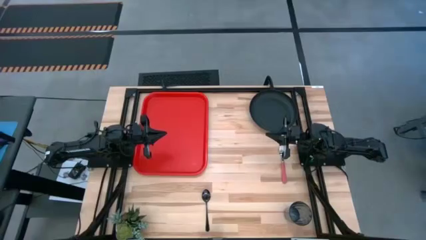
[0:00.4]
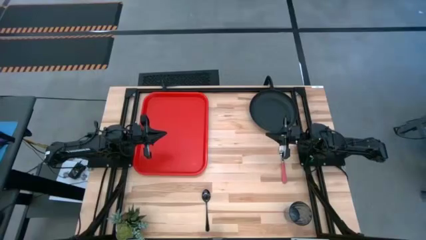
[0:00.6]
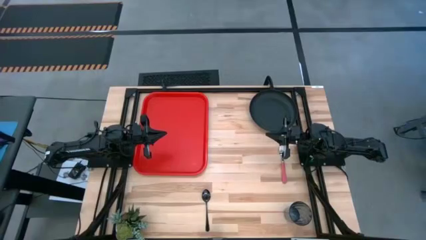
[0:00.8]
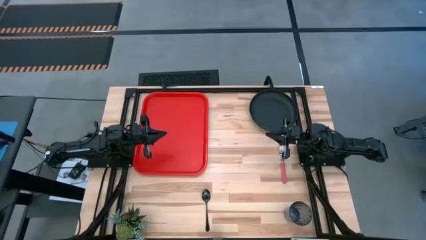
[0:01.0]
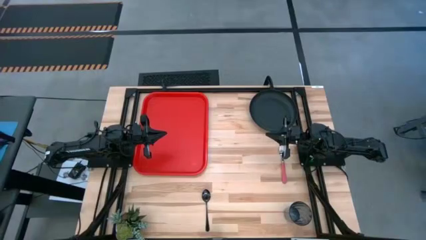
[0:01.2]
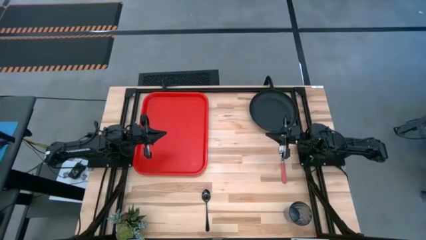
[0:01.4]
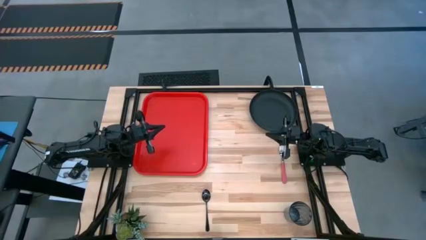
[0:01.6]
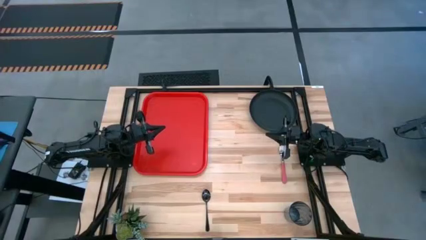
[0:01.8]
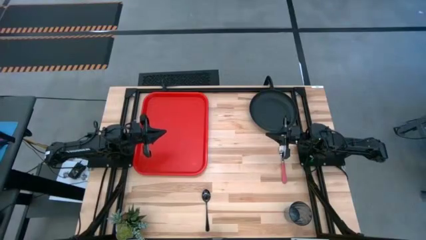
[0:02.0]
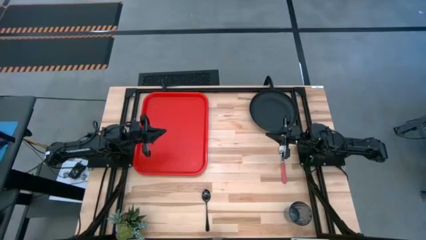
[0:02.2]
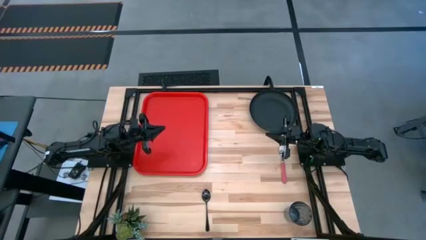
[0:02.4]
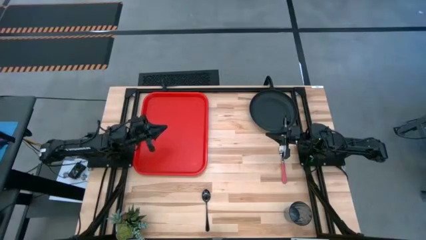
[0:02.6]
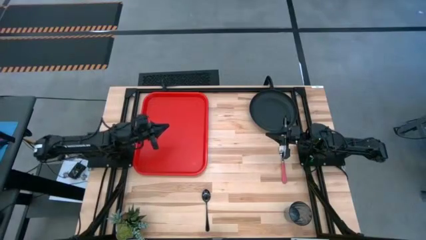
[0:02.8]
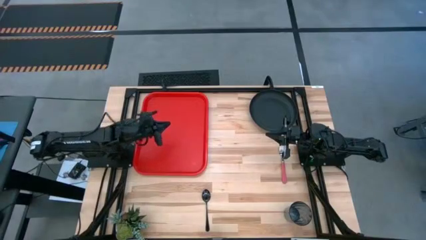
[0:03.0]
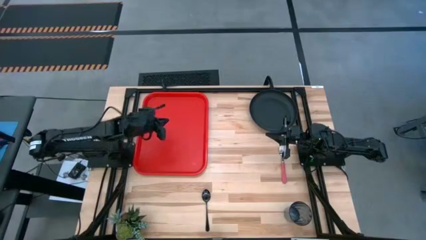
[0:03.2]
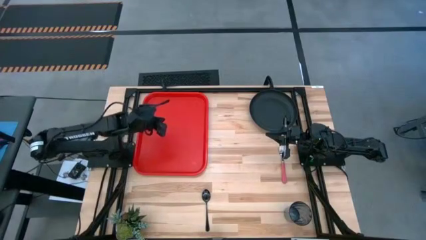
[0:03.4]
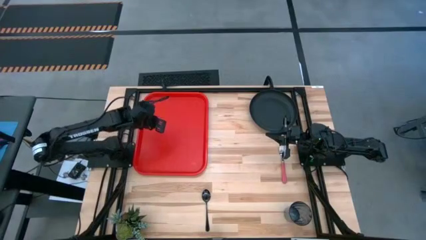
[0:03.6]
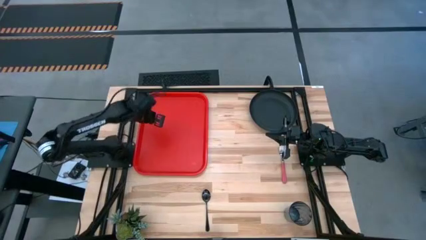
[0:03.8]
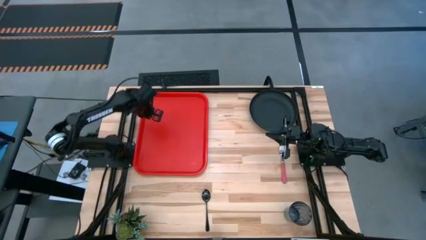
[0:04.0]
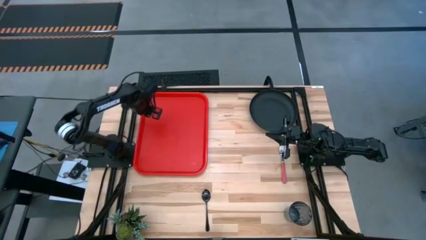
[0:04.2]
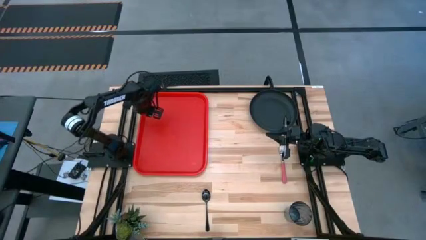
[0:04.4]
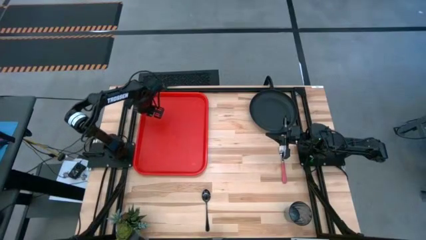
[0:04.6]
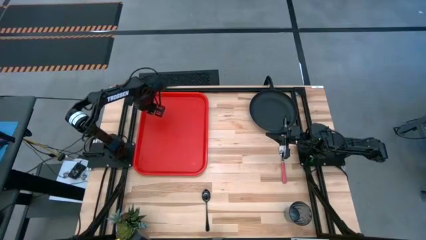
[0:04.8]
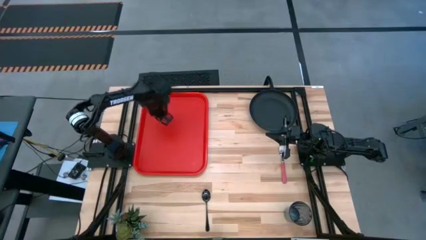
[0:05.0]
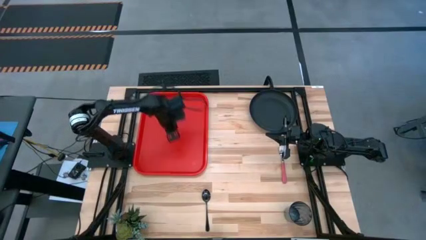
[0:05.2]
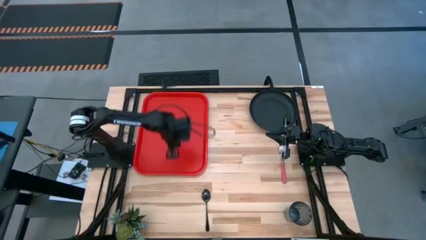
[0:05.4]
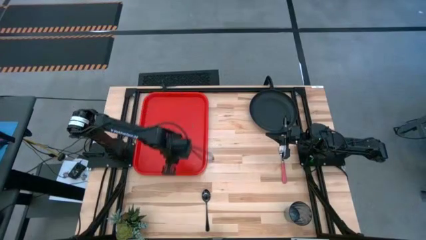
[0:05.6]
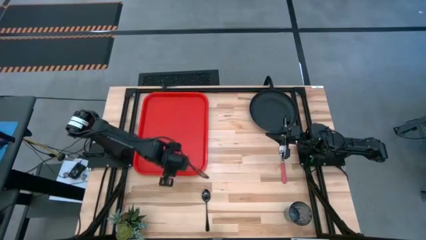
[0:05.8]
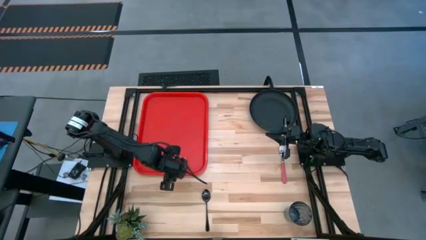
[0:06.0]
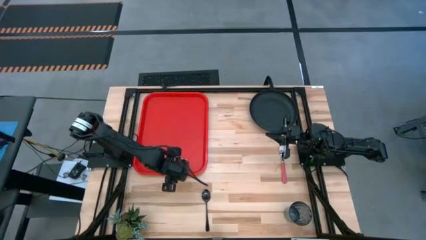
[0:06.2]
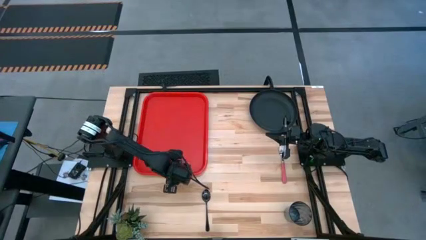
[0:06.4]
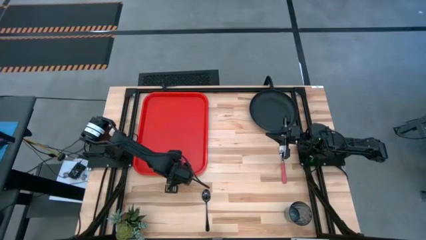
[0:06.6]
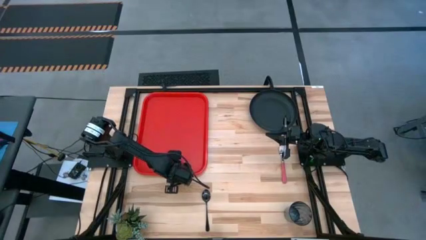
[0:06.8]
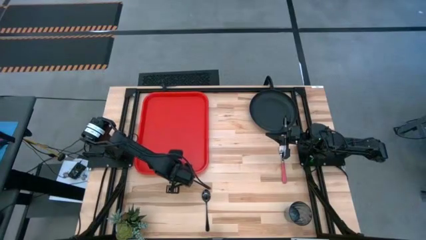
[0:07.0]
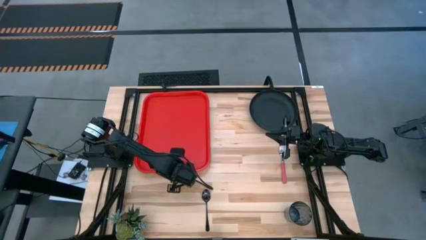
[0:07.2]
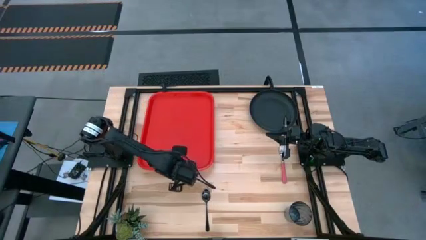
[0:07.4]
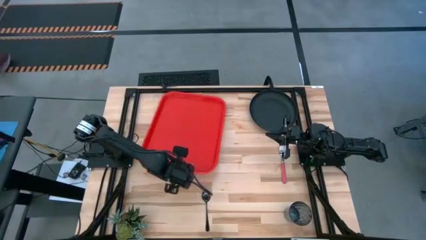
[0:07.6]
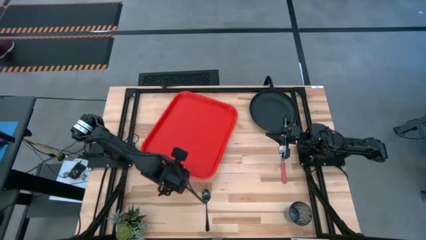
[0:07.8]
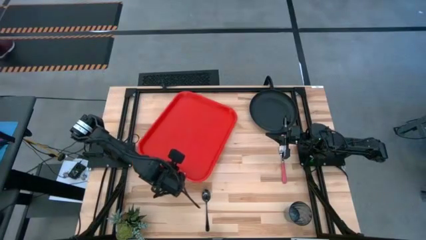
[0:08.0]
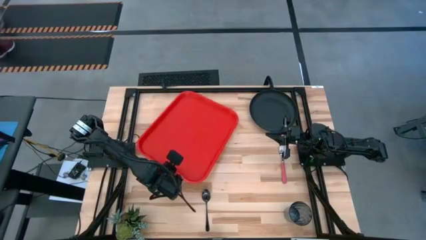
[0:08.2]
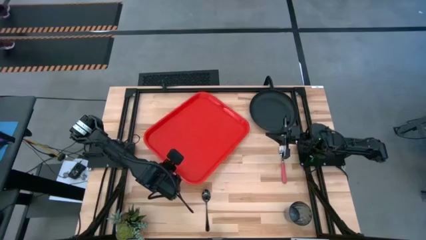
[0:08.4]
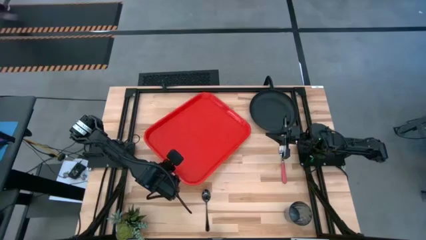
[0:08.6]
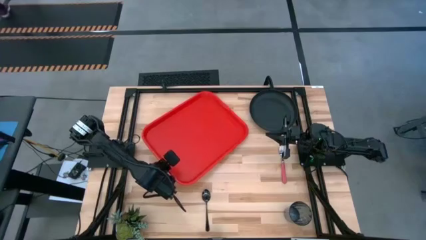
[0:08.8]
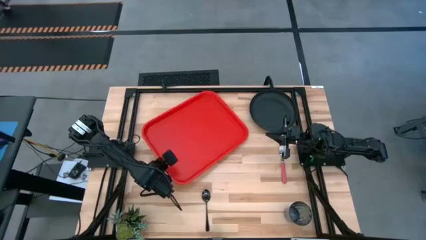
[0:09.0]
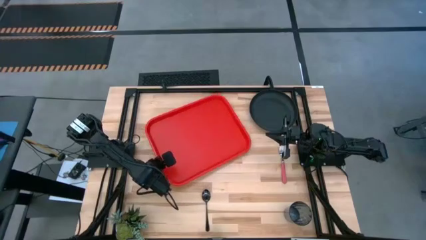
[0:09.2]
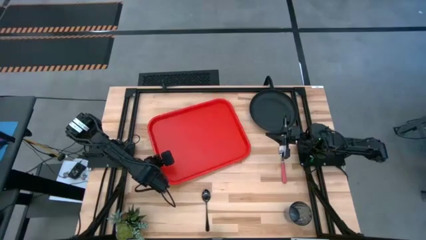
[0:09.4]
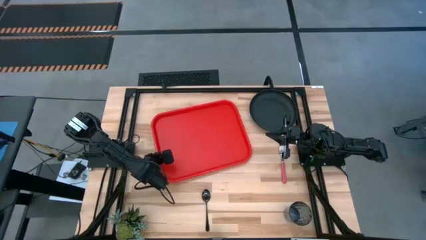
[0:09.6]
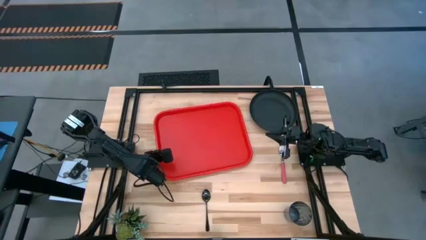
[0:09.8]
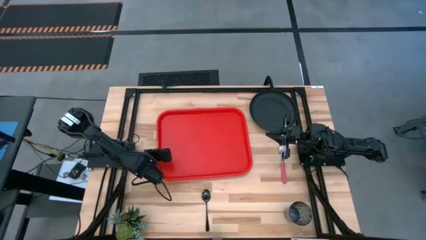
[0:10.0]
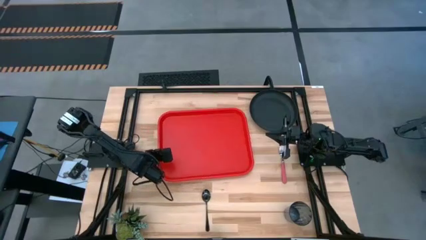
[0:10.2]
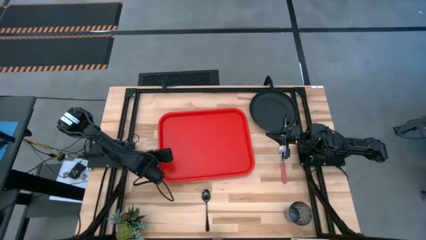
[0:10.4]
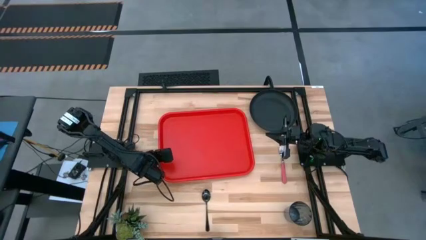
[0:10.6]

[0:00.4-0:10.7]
Task: Pick and place plate/cup/fork/spoon on tray
Prepare the red serving tray
